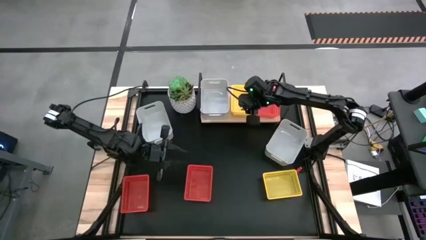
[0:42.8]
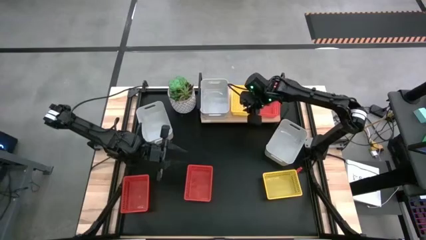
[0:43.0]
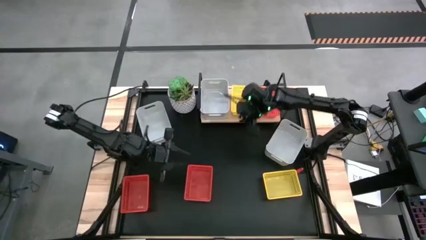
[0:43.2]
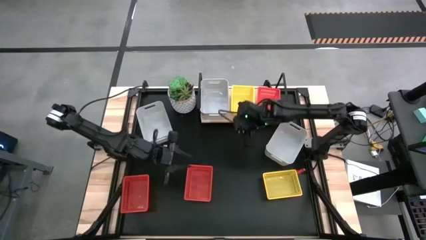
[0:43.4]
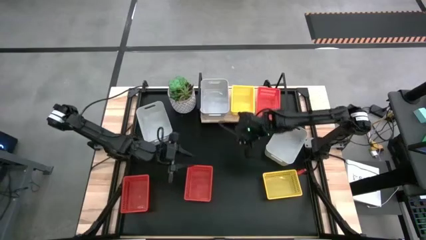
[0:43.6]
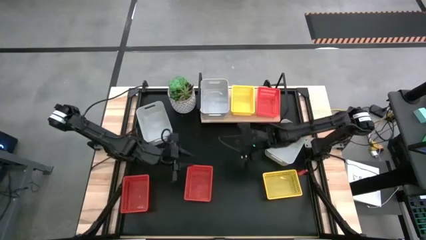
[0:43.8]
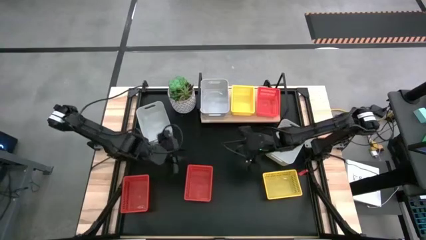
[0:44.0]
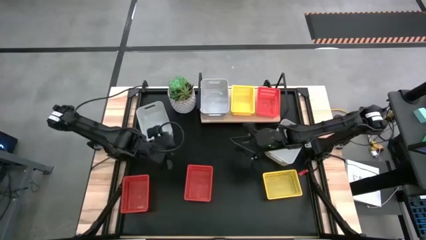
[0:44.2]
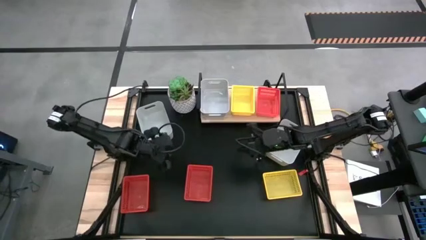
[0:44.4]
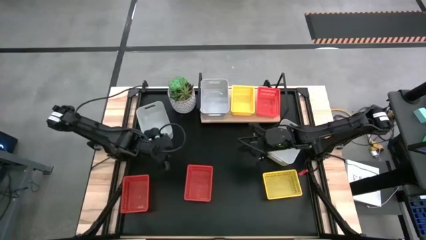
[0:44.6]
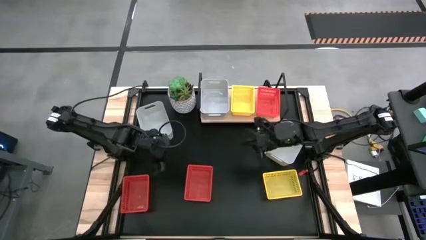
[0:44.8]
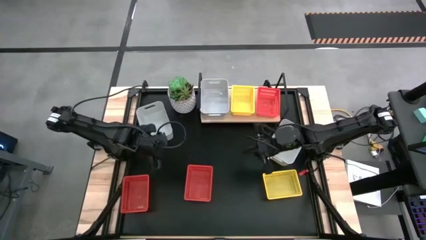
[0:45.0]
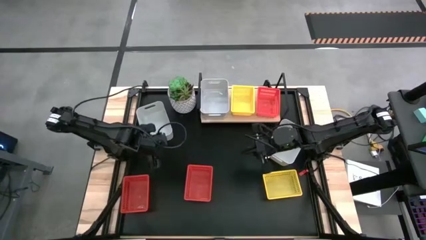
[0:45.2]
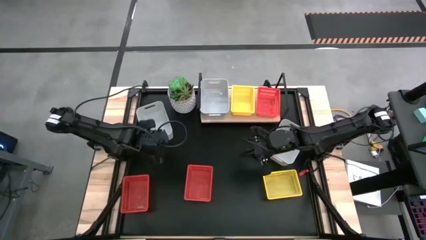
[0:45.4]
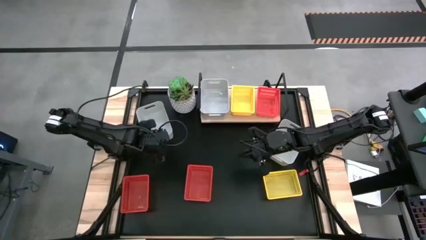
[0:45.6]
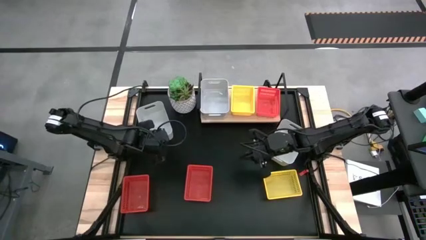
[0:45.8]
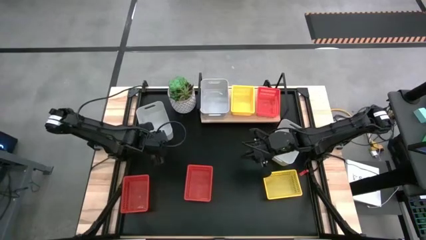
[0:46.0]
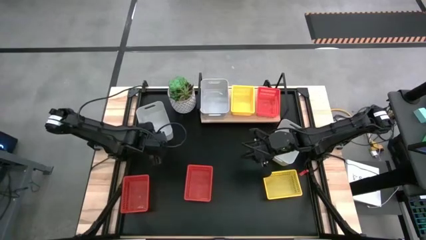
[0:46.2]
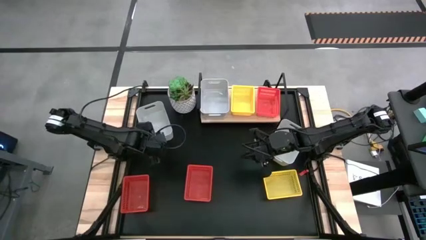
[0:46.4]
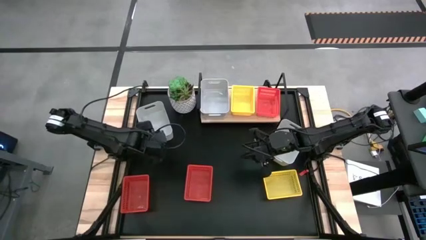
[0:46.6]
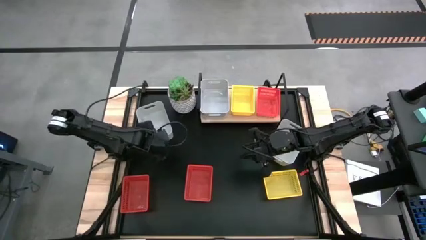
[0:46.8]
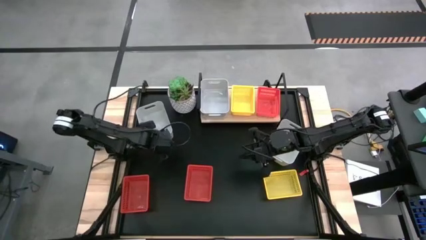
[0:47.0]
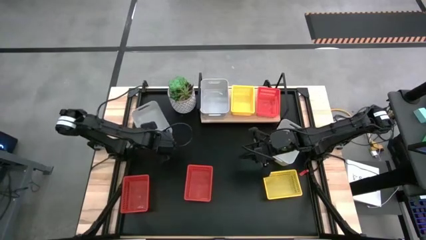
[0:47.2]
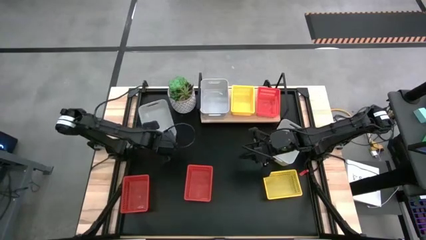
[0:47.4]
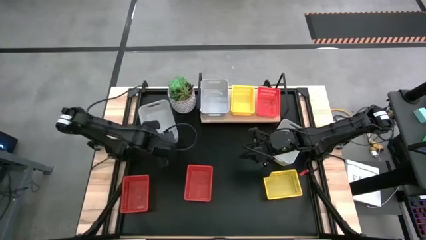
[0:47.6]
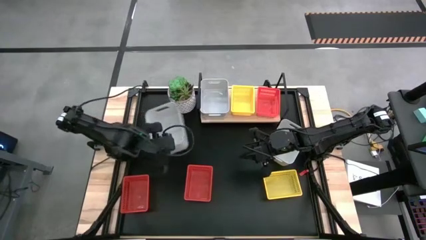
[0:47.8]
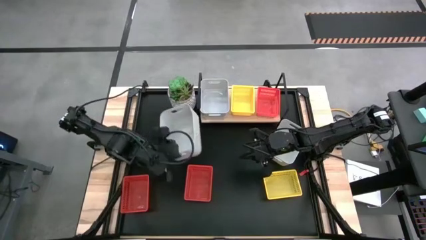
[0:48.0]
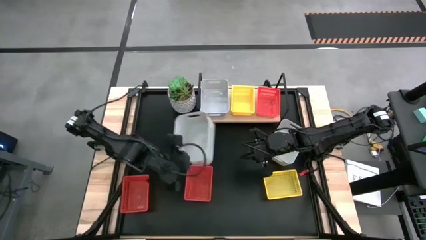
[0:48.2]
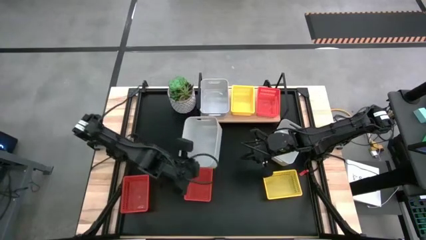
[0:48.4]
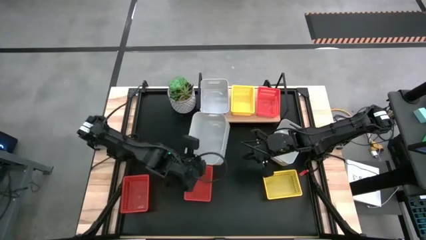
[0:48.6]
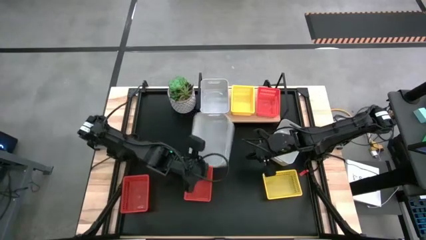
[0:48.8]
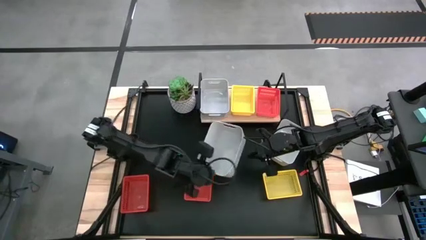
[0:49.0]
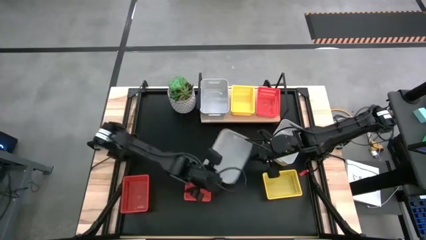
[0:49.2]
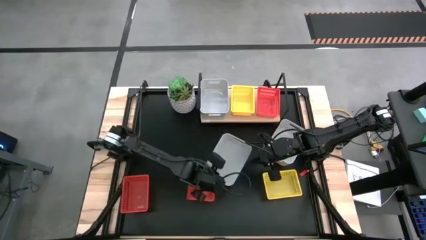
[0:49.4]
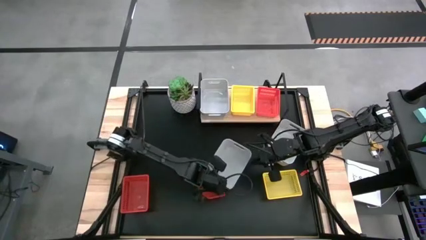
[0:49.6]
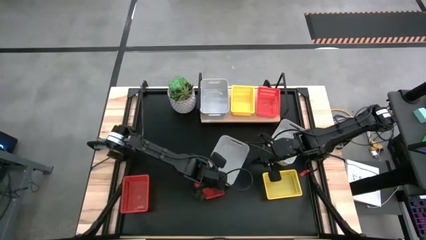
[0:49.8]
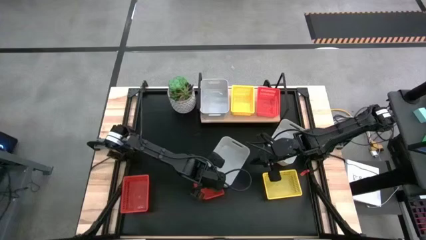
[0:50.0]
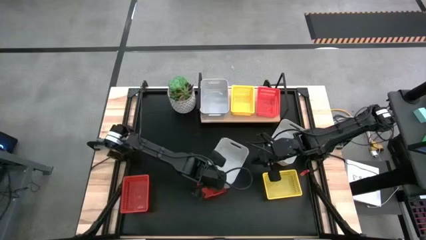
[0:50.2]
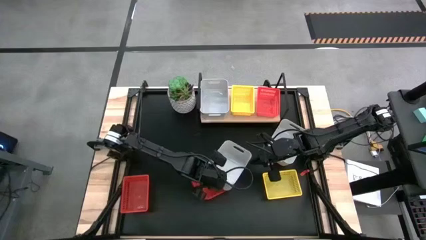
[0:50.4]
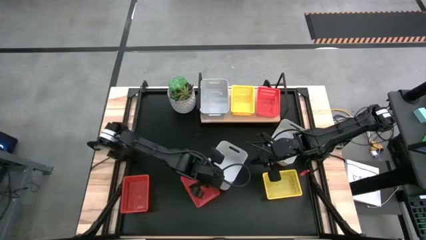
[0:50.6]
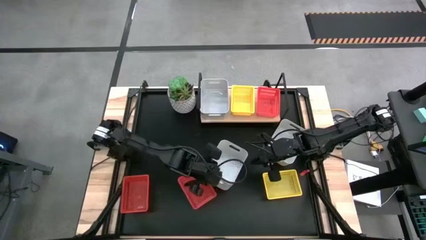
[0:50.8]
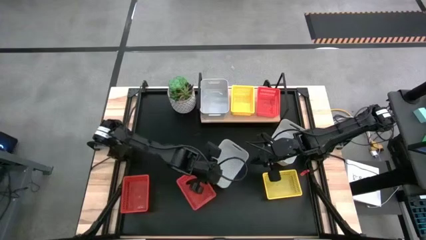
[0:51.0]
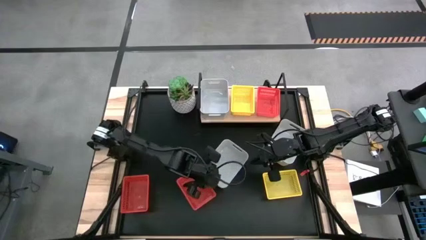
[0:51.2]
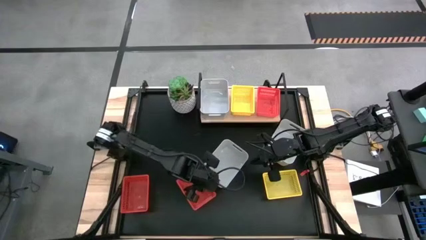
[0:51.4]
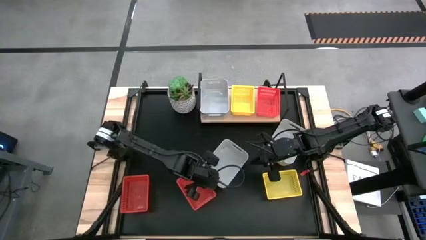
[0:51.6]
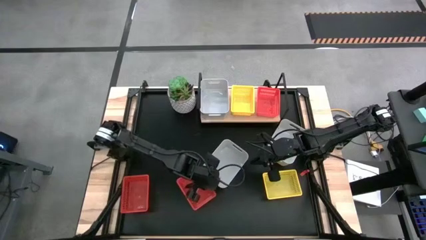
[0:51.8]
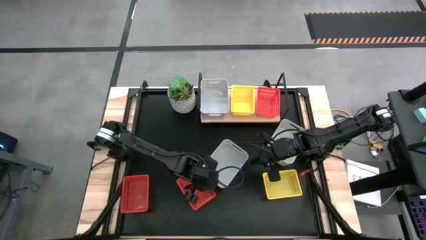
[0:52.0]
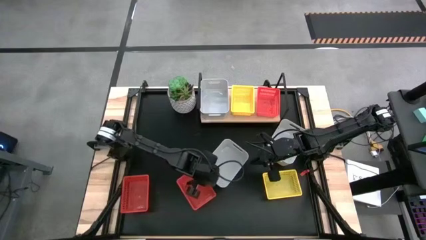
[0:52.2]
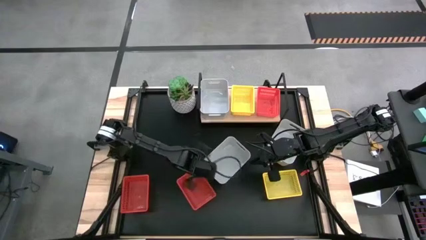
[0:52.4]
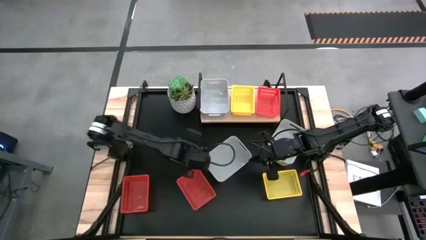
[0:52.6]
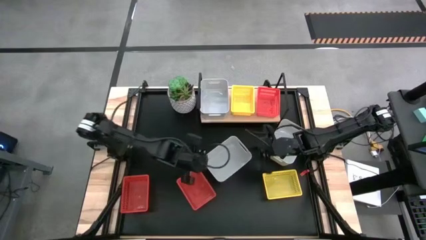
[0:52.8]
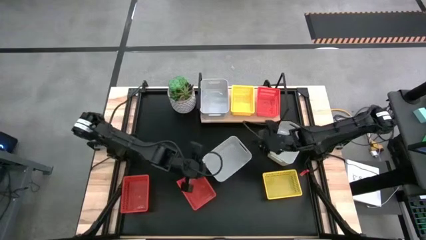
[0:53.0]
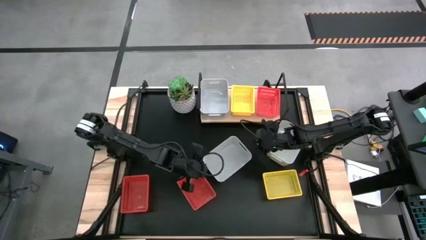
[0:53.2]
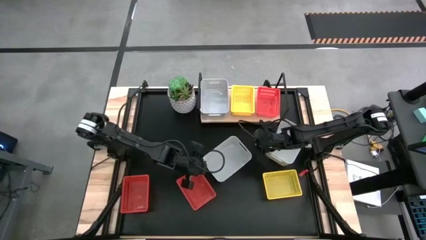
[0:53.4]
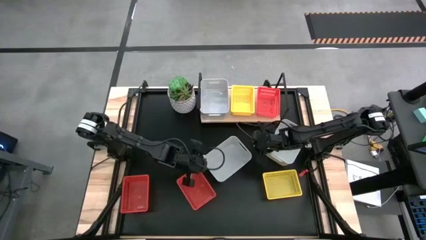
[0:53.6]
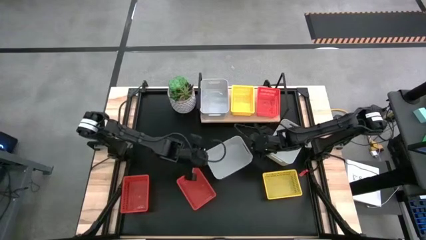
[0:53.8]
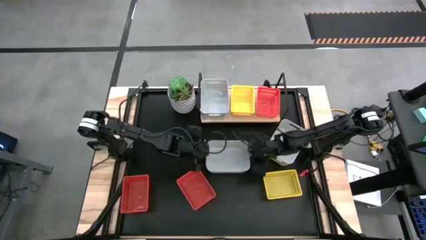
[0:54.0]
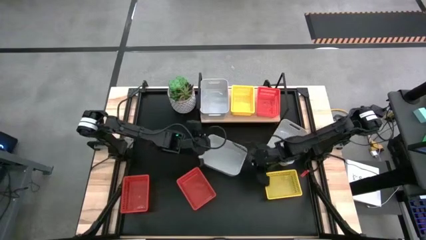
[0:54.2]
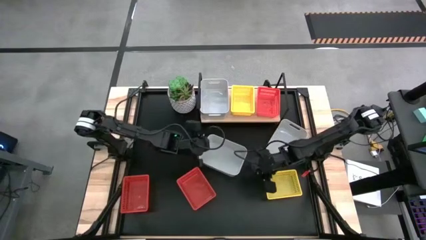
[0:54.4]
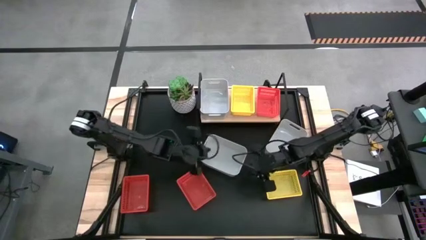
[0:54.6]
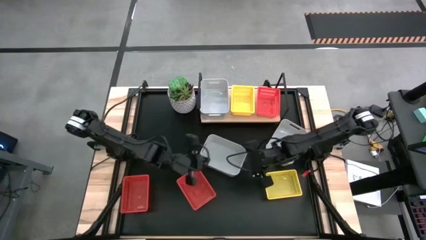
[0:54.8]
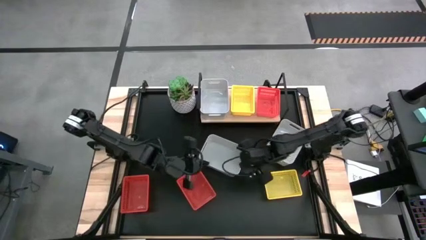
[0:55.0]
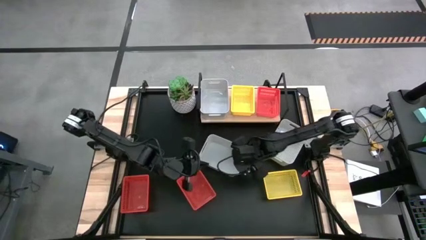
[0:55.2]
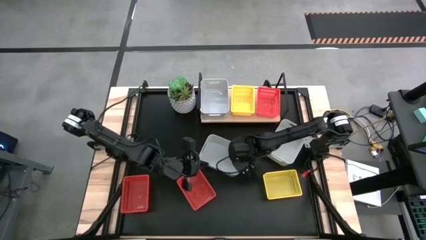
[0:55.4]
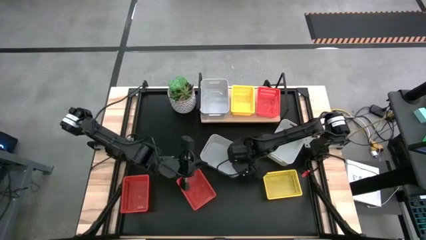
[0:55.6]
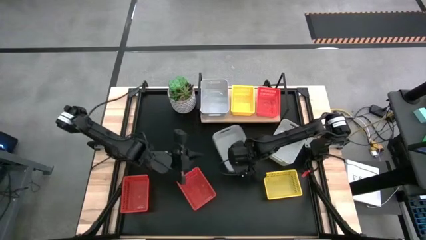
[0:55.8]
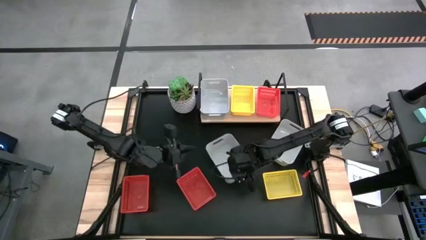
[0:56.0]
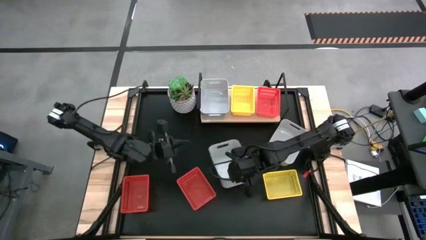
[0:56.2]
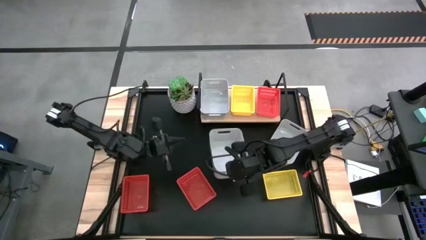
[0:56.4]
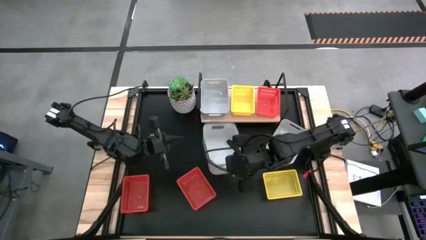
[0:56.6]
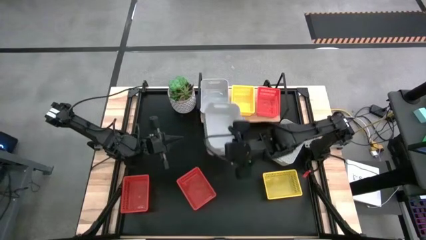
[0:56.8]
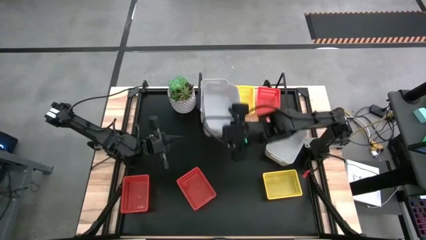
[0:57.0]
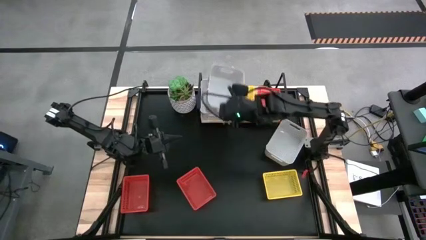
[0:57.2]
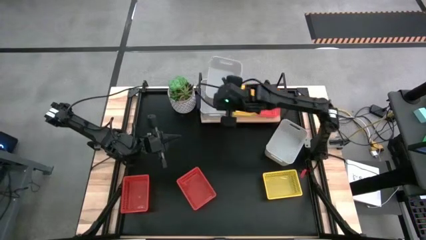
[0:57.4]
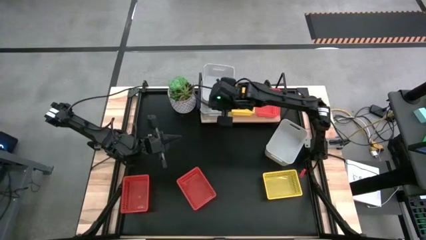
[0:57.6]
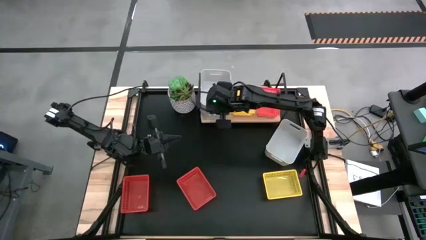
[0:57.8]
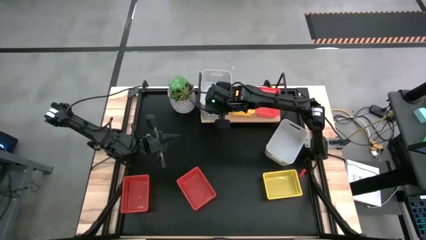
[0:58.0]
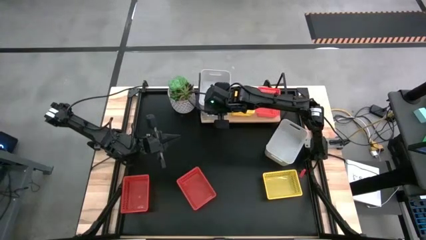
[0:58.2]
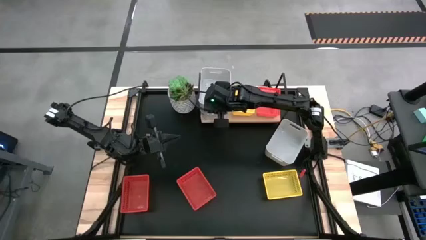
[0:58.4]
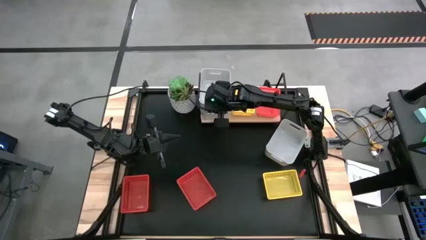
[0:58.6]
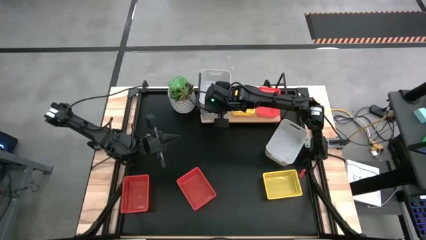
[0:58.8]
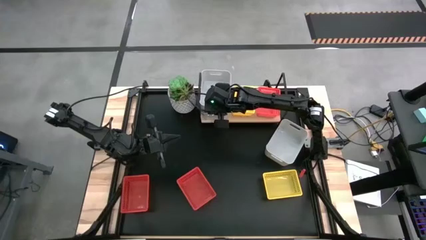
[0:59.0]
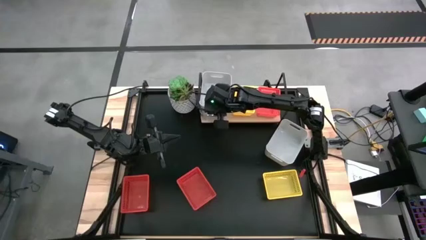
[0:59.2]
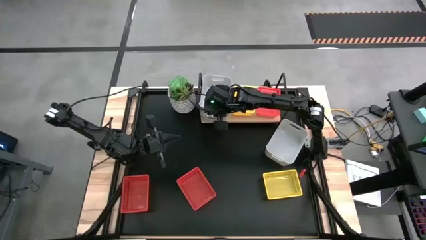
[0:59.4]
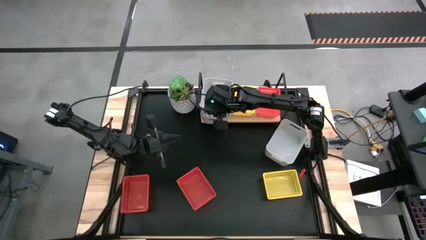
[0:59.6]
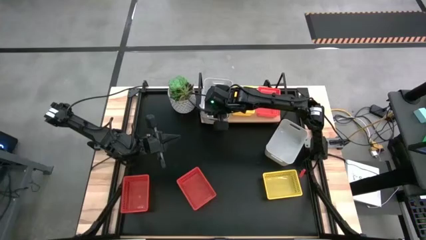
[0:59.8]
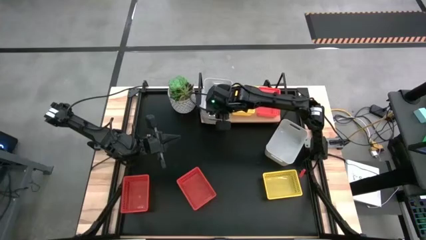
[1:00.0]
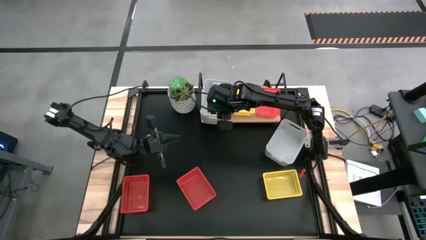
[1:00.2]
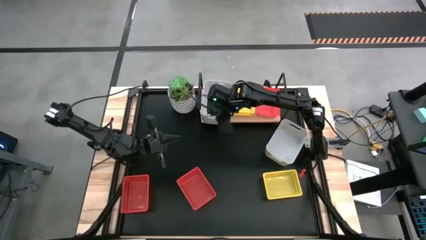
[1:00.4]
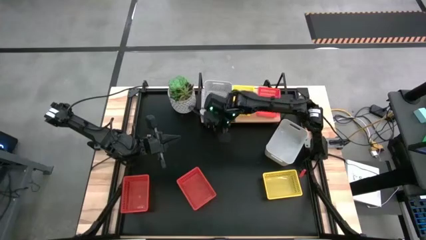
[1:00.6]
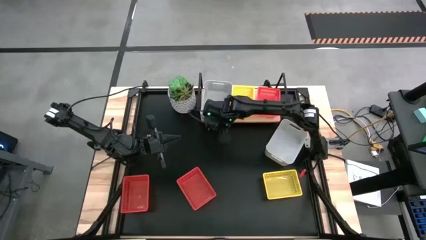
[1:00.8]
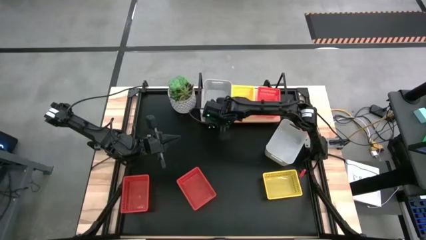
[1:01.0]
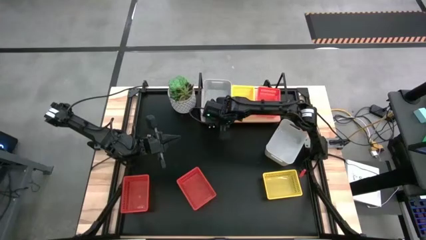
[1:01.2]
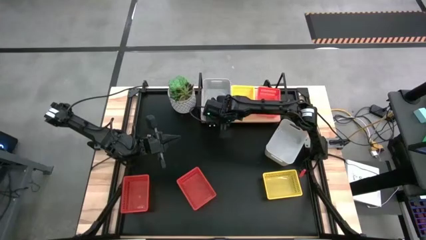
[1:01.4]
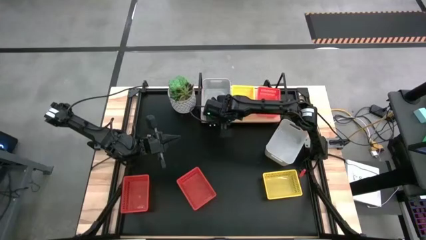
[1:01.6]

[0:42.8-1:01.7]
Task: Stack baskets on shelf by color
Stack the left gray bin on the gray bin on the shelf
